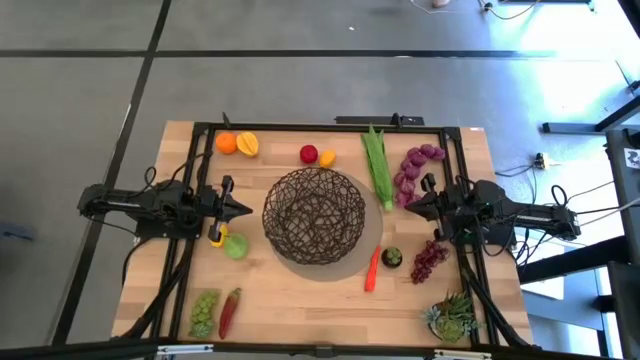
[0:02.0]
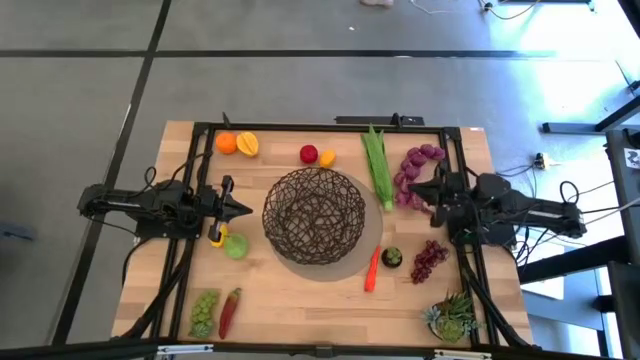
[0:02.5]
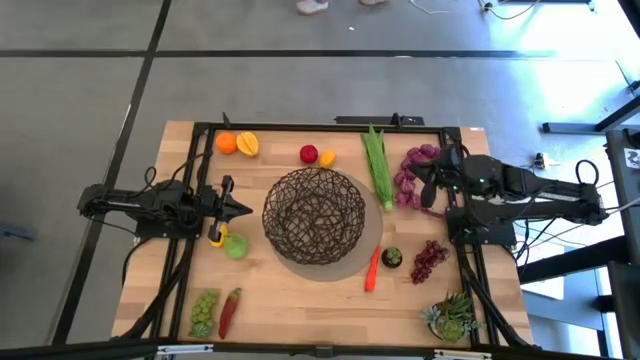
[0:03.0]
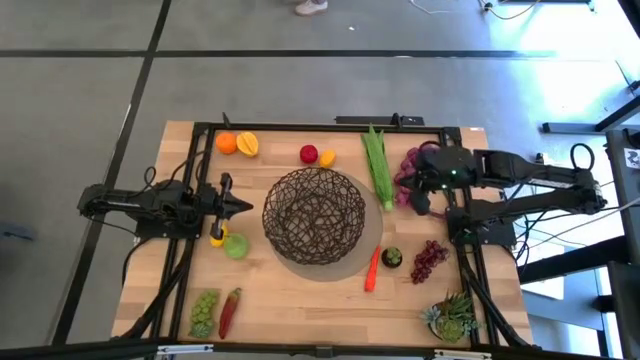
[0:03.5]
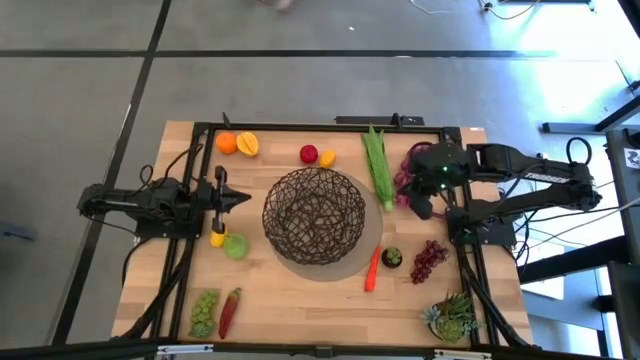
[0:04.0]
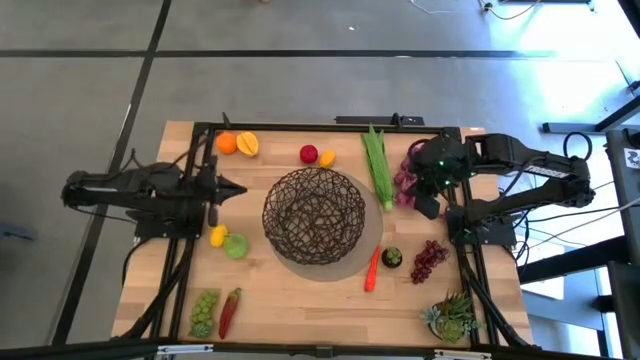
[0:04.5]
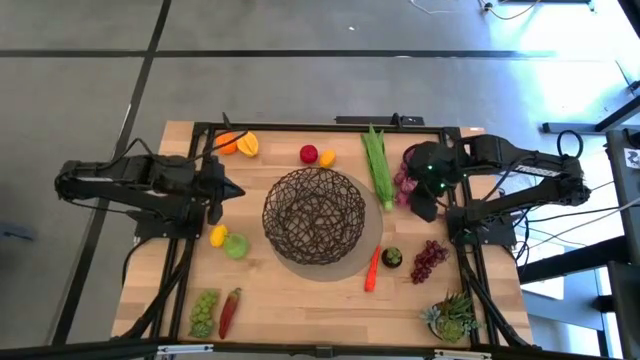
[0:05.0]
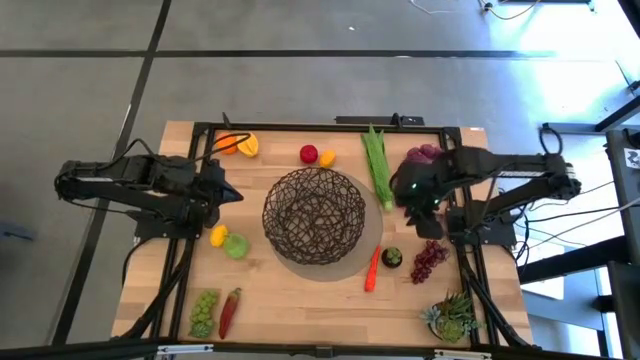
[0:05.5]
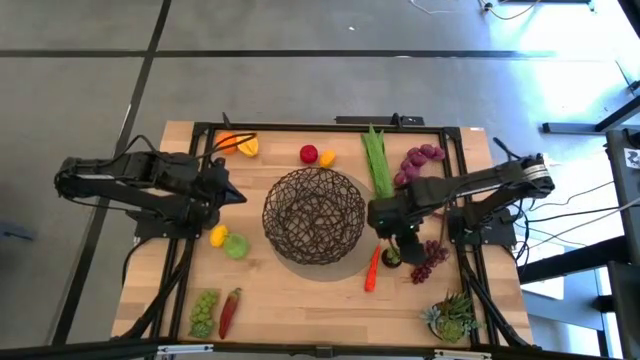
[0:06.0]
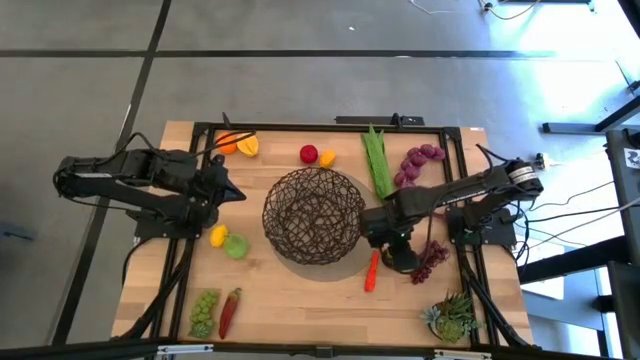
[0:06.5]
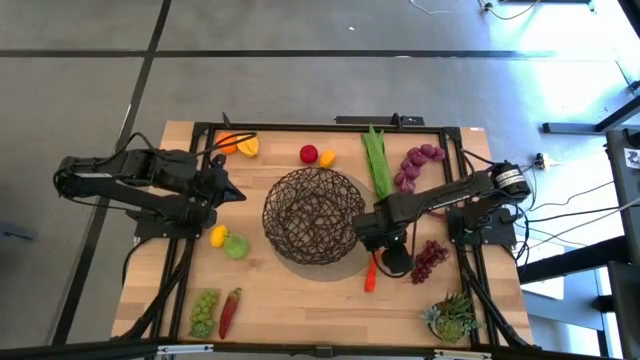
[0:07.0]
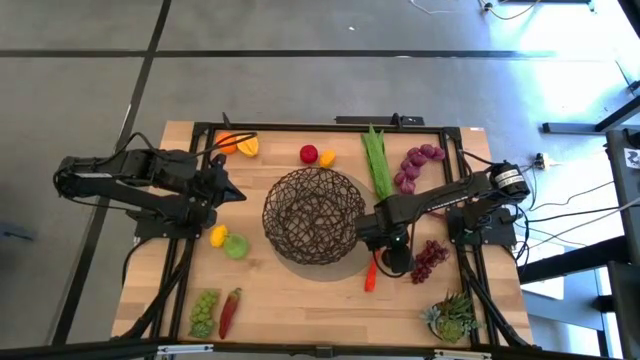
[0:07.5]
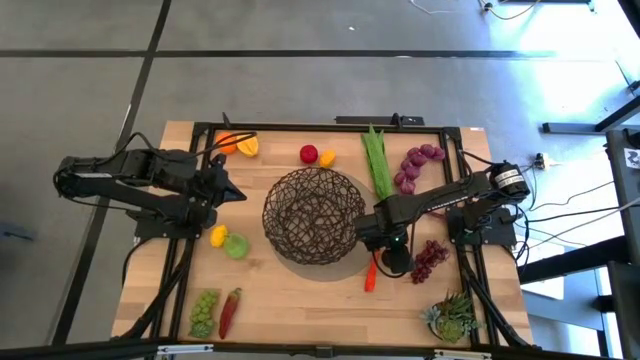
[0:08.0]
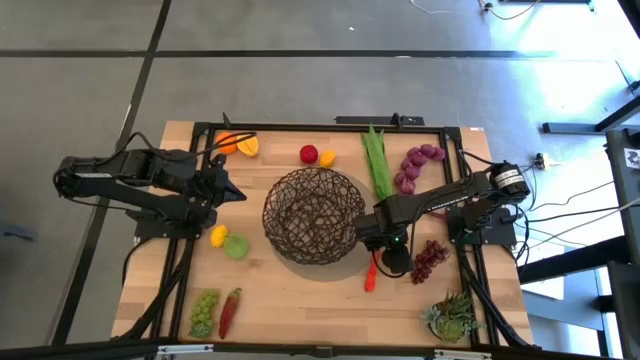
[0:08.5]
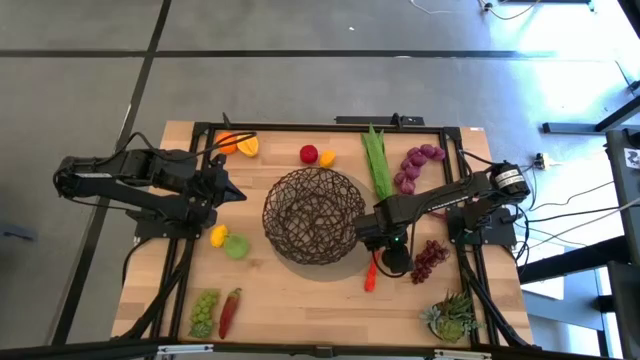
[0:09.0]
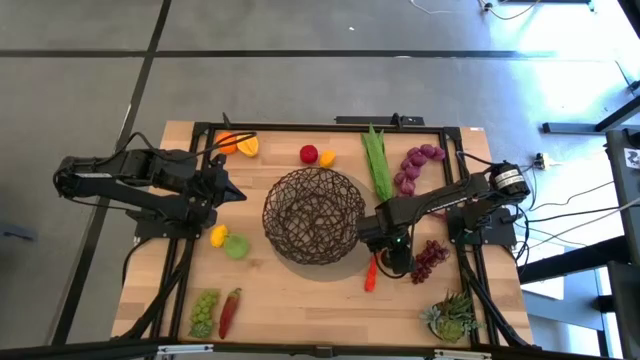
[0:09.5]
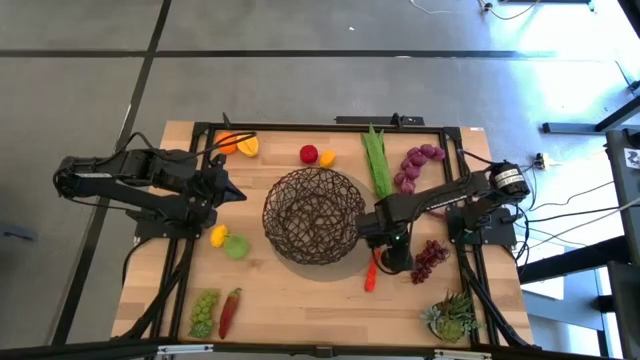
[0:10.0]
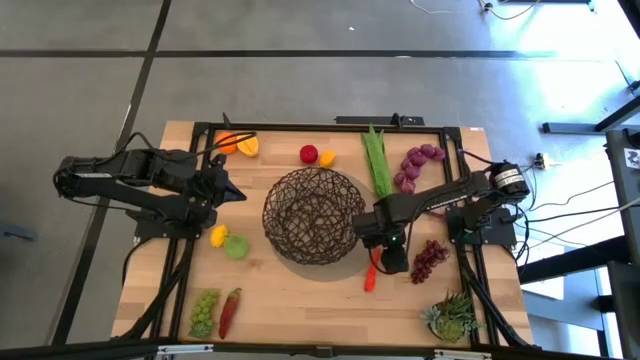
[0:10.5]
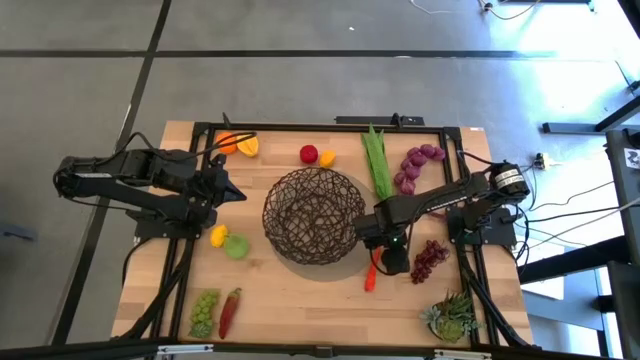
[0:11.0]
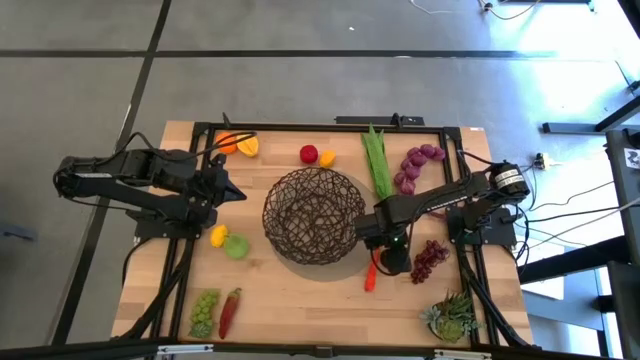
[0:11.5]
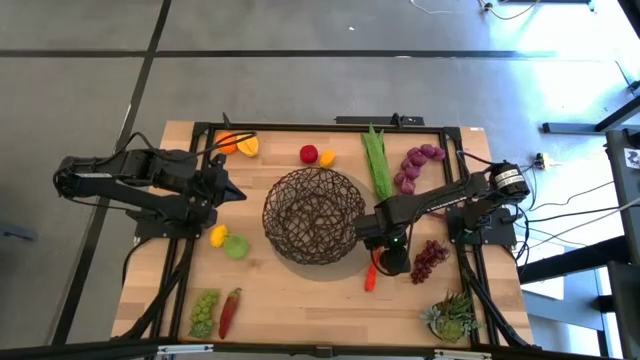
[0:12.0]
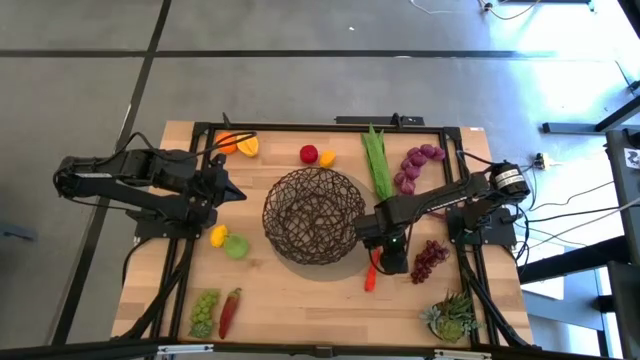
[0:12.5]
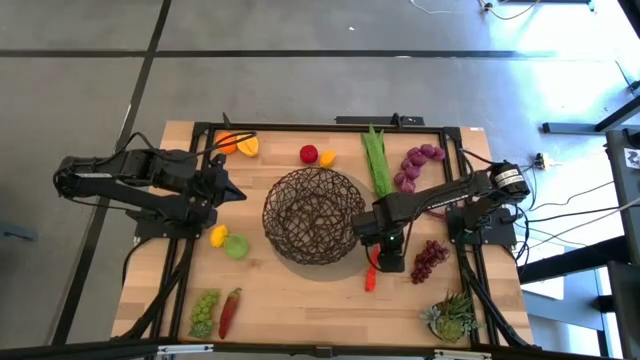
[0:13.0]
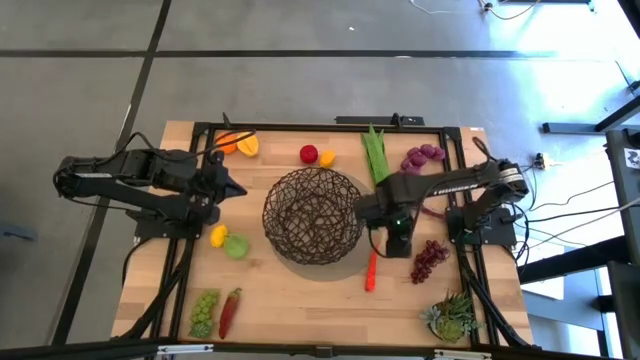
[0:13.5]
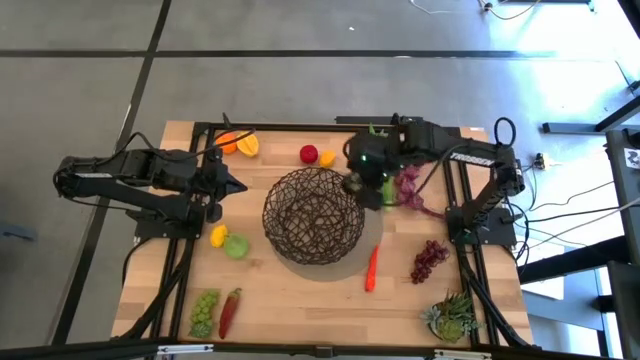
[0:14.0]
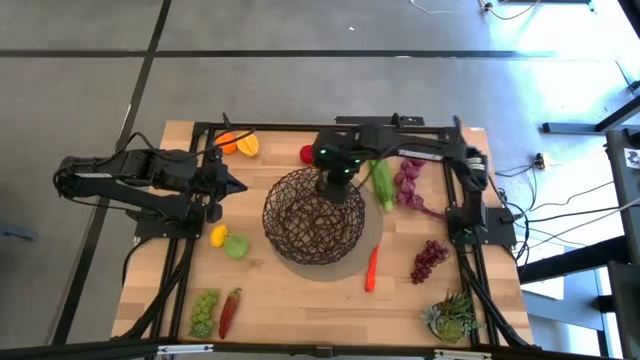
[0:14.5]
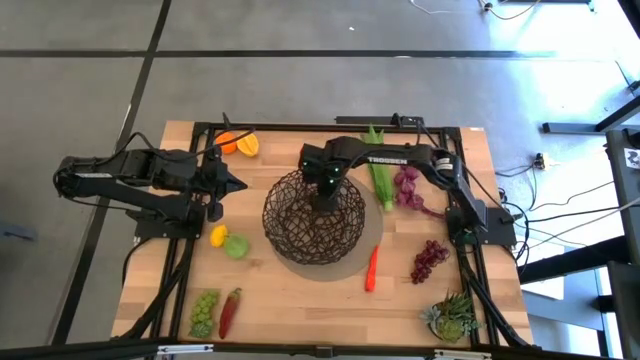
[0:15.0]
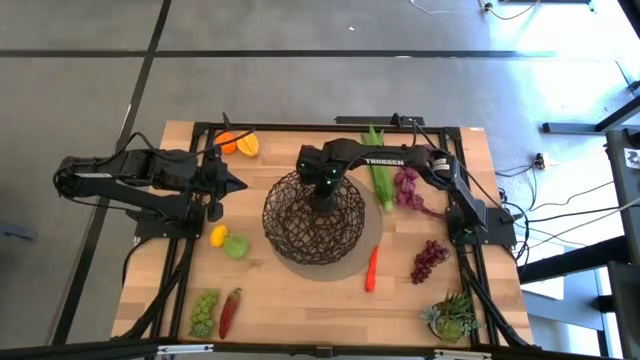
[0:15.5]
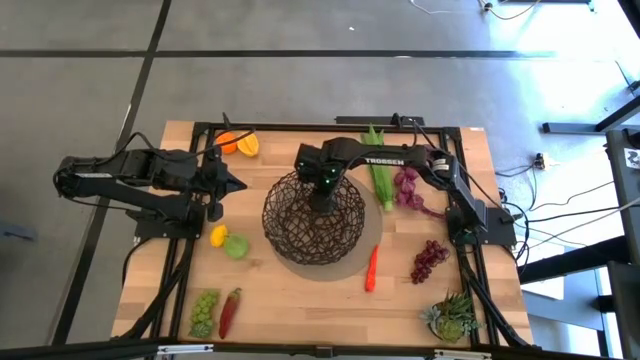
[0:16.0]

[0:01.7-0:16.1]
Task: Build produce basket
Put the mangosteen into the wire basket

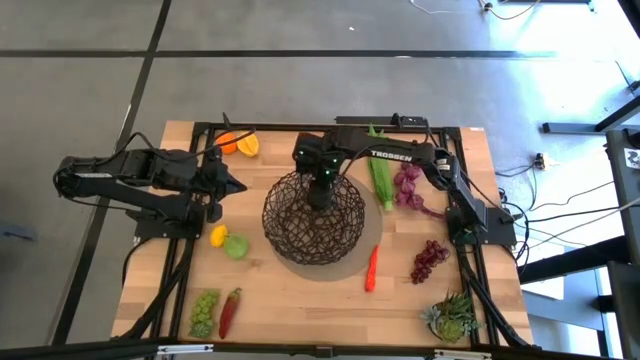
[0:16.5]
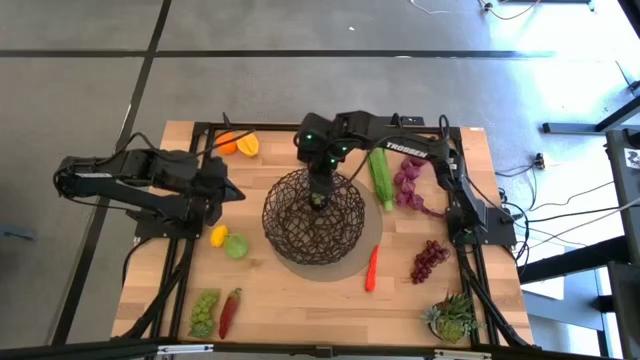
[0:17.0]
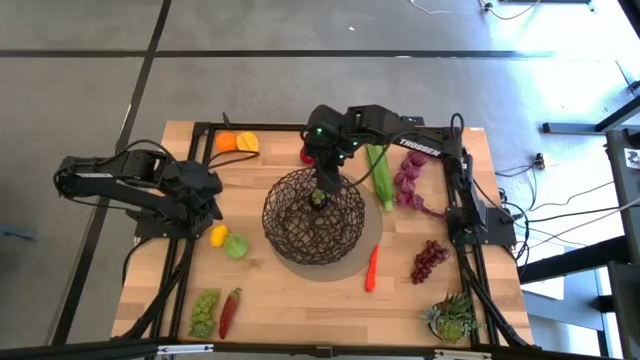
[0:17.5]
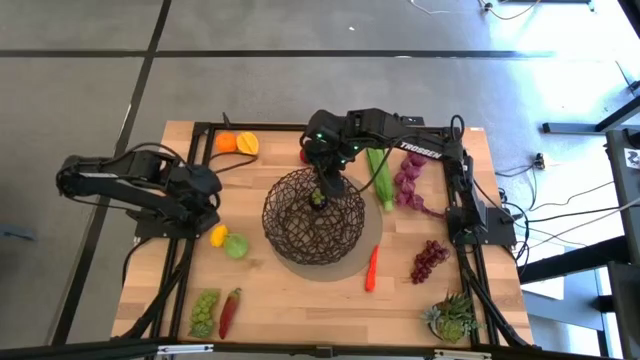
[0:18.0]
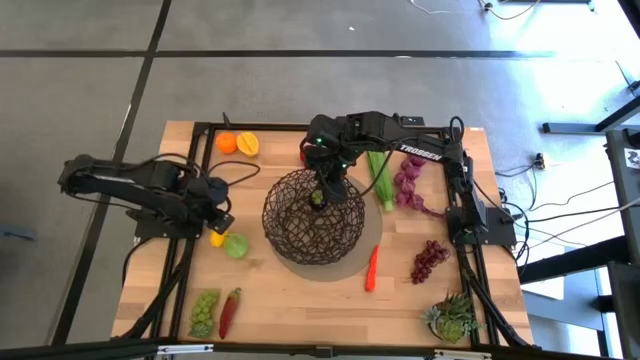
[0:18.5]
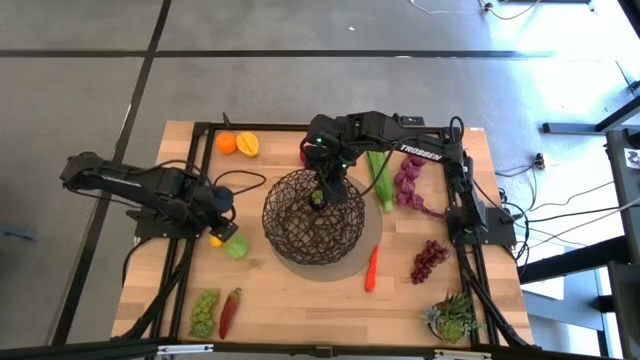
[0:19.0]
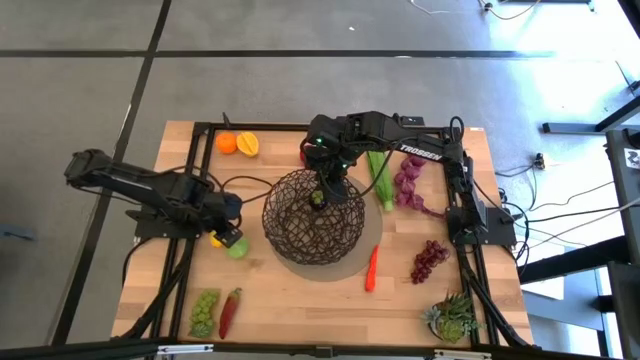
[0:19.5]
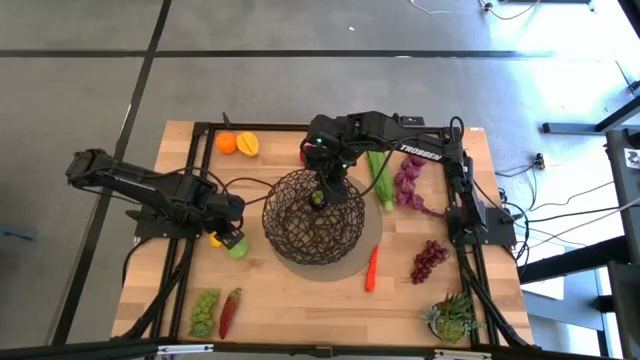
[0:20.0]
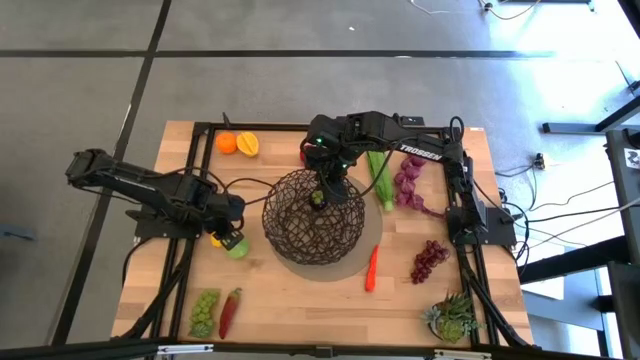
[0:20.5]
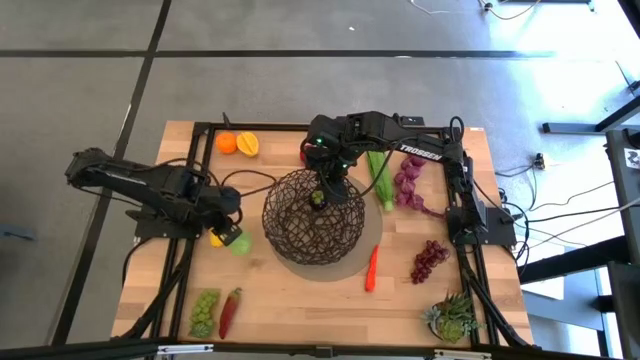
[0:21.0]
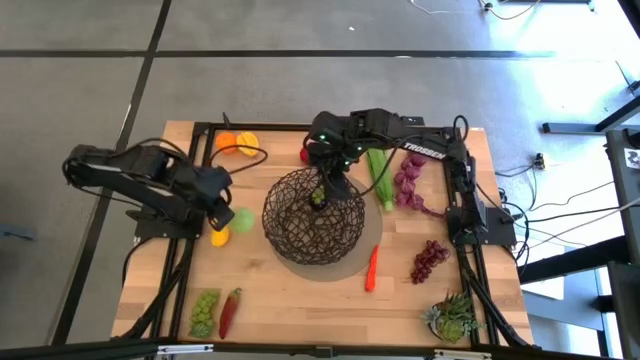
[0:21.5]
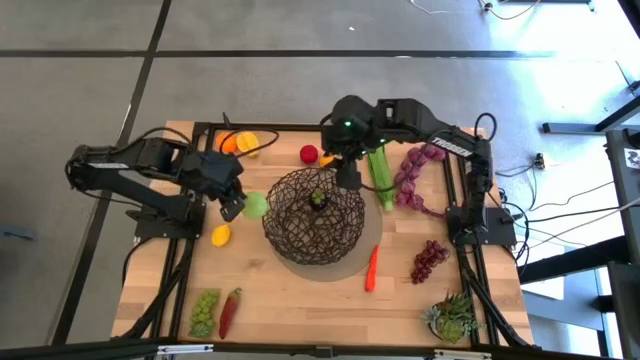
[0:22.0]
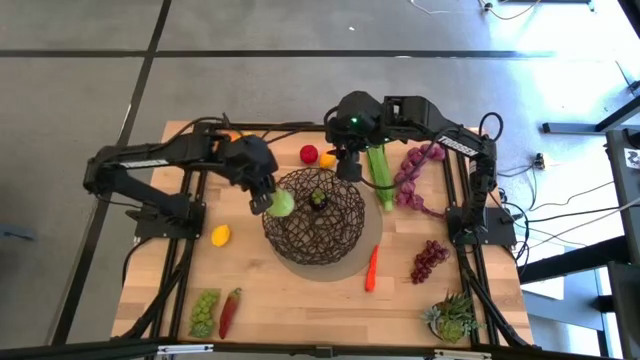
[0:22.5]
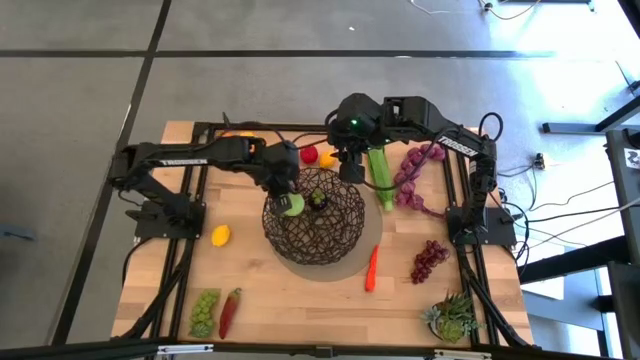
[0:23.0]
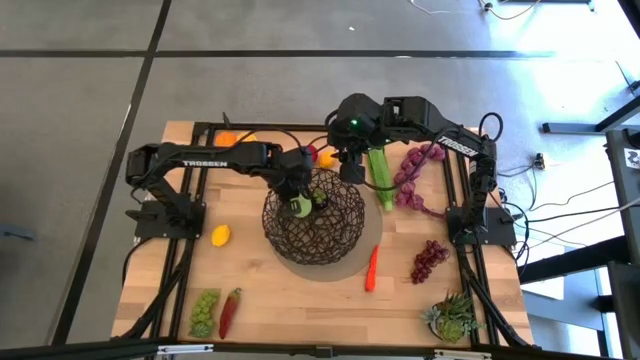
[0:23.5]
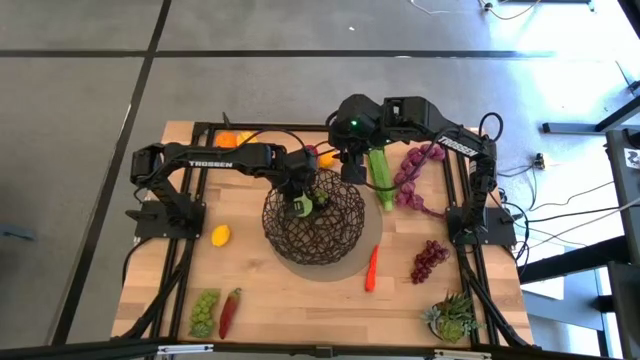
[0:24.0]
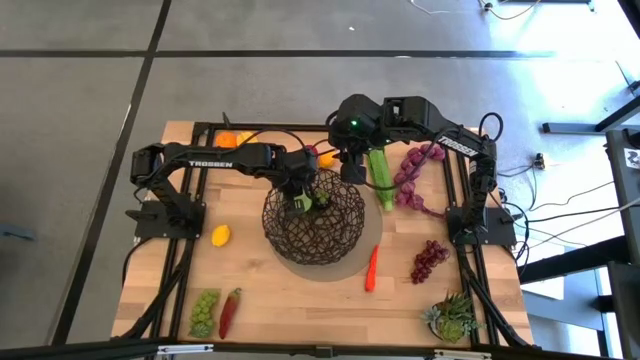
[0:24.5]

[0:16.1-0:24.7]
Put the pear into the wire basket
